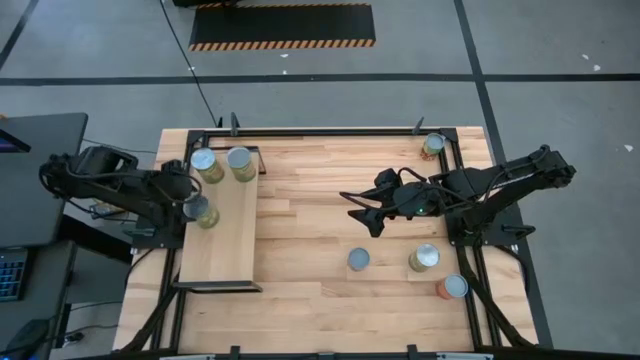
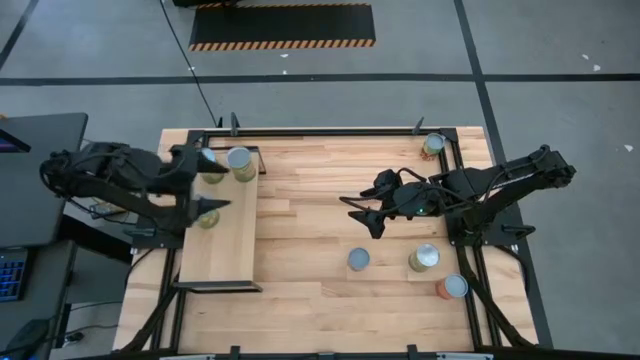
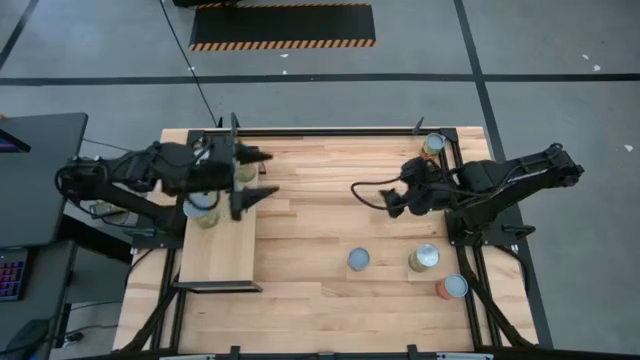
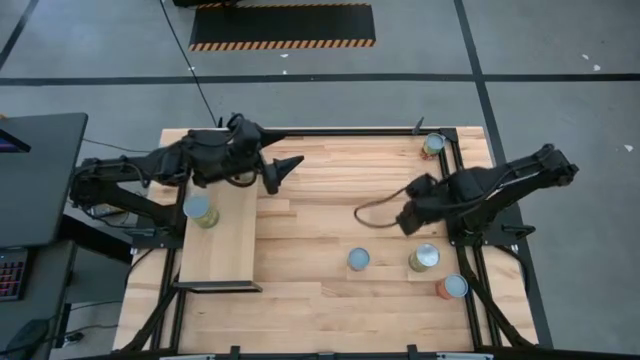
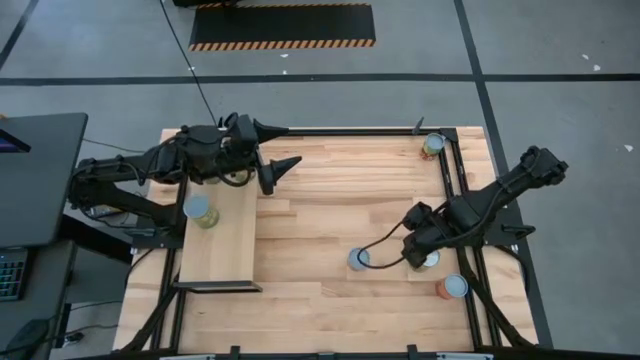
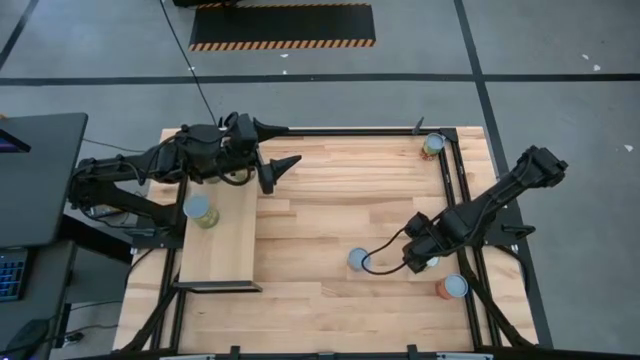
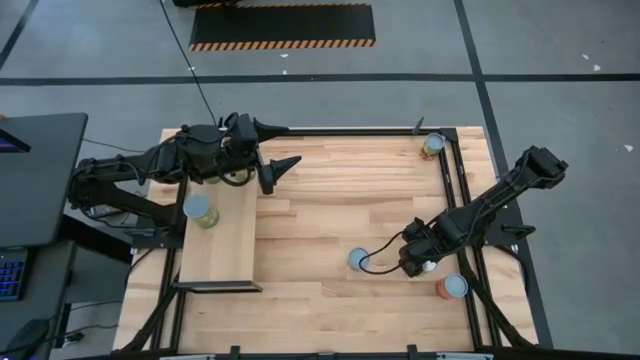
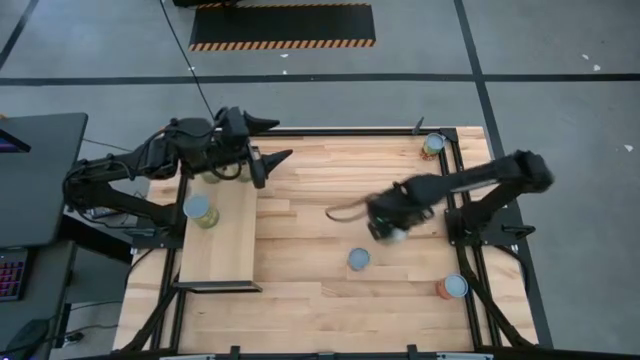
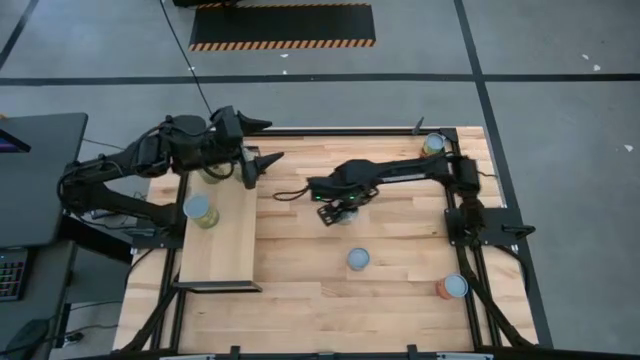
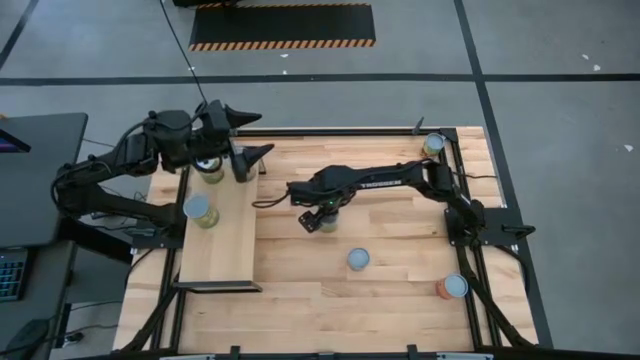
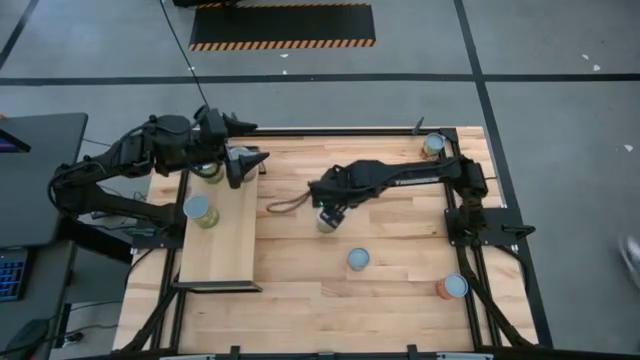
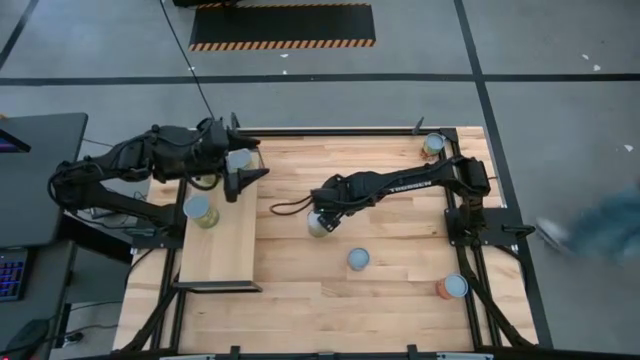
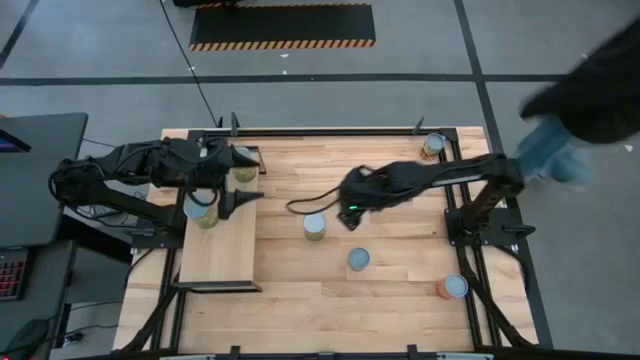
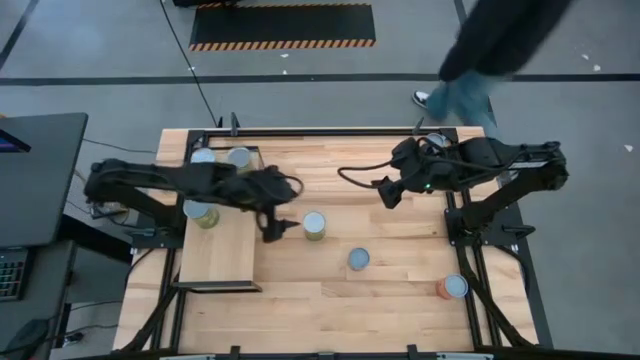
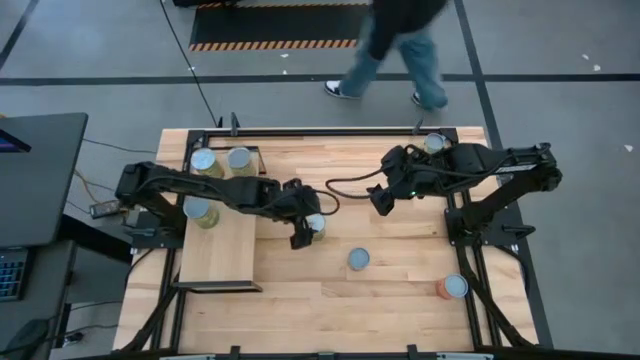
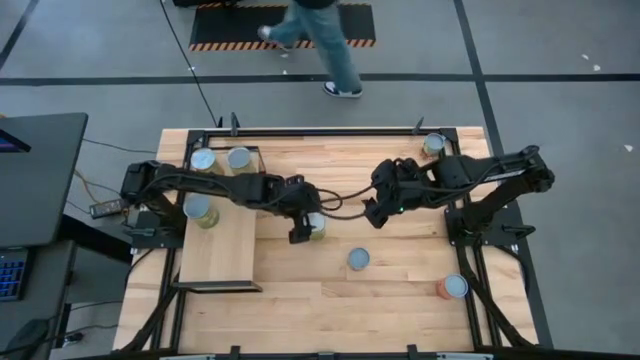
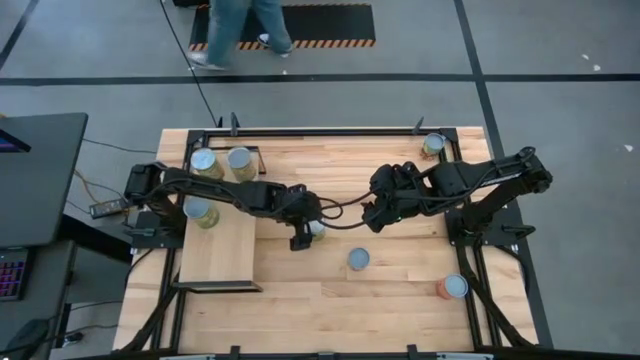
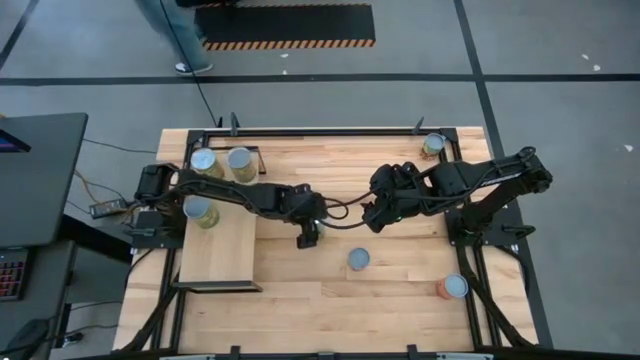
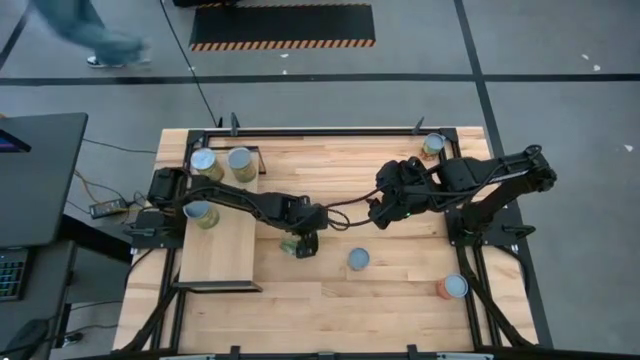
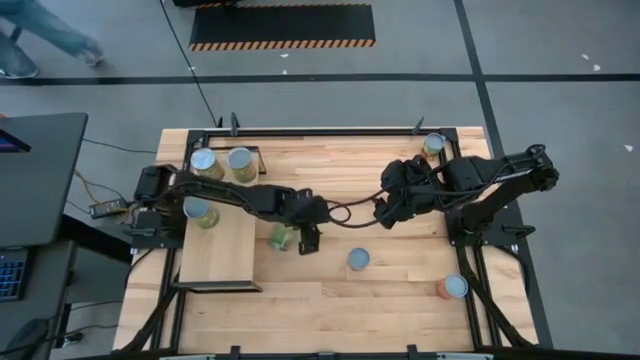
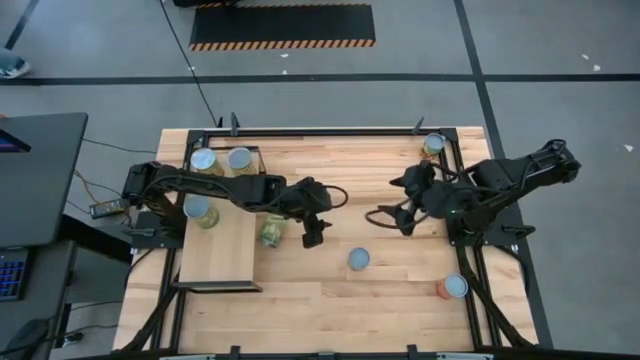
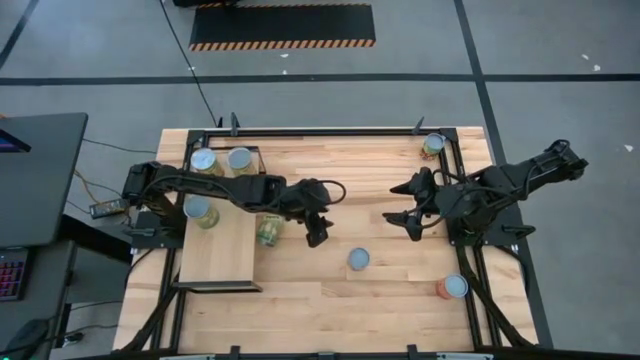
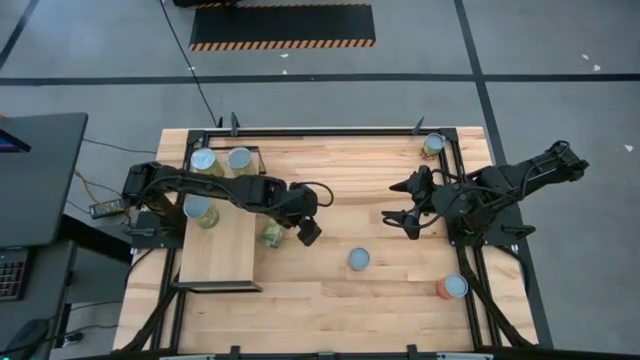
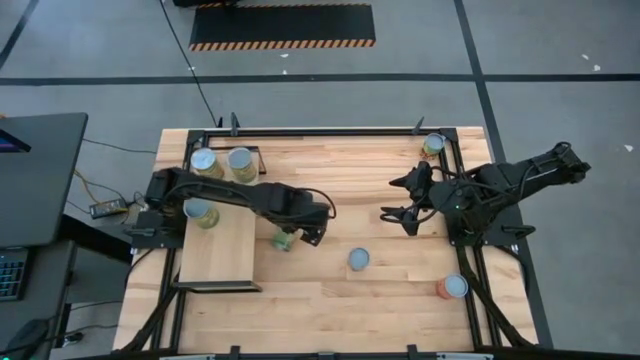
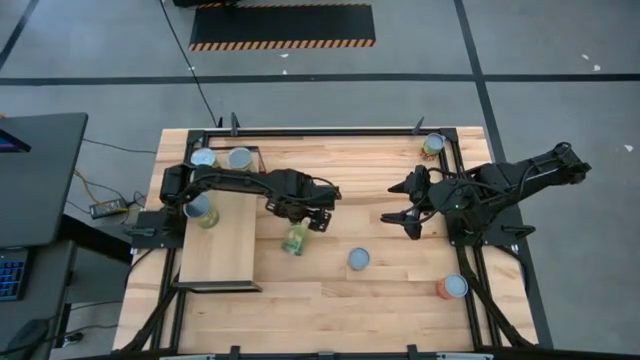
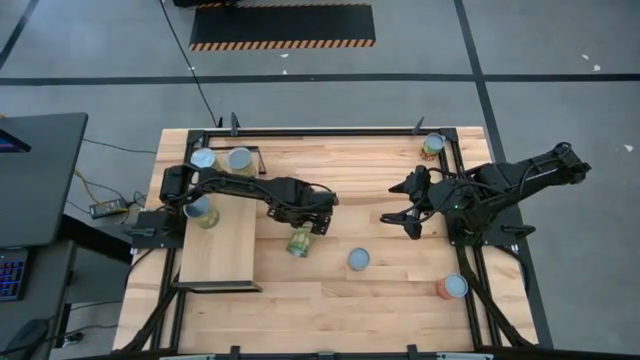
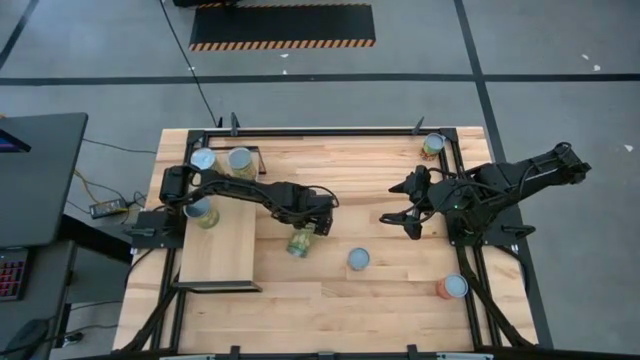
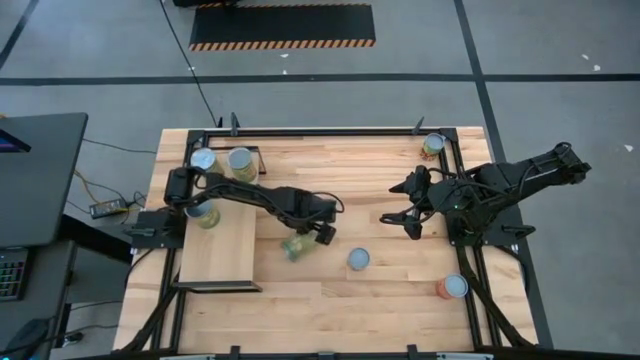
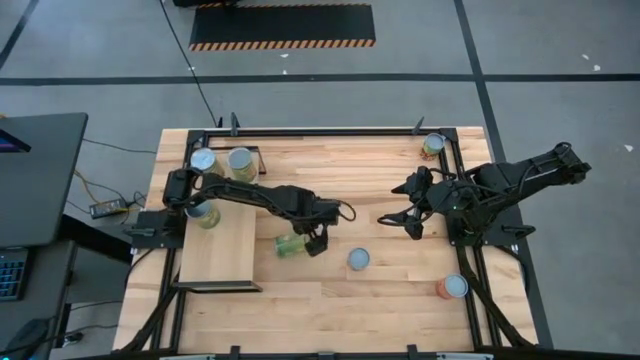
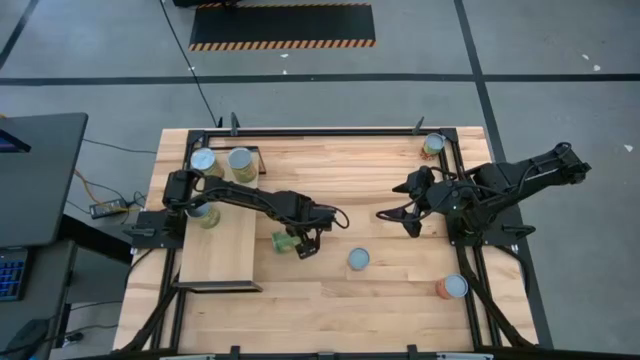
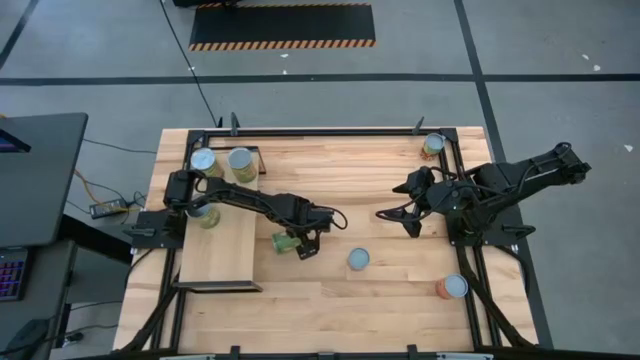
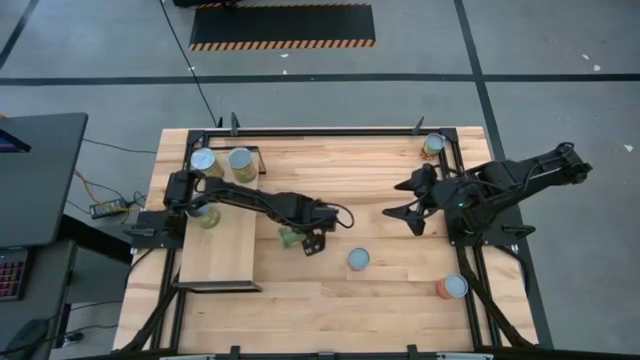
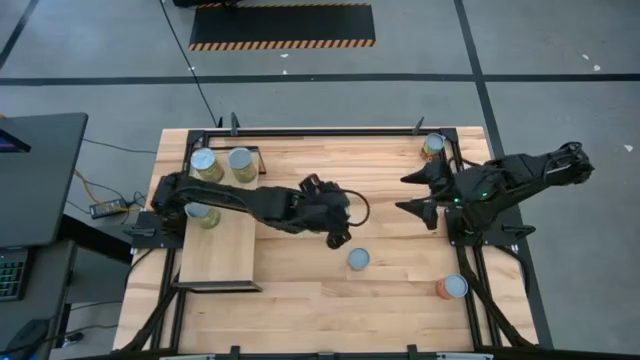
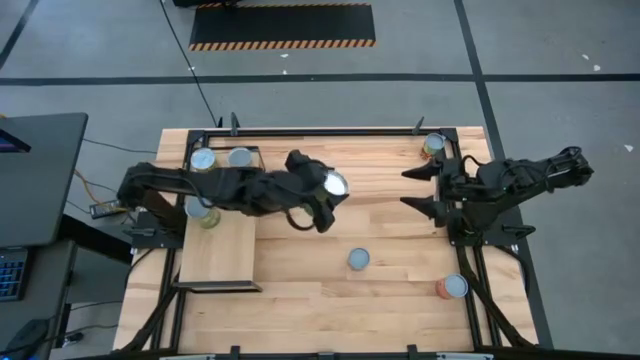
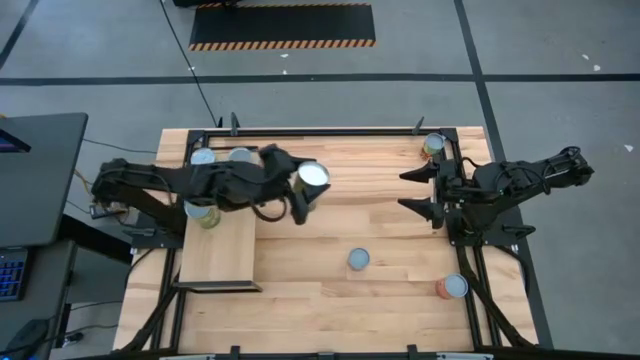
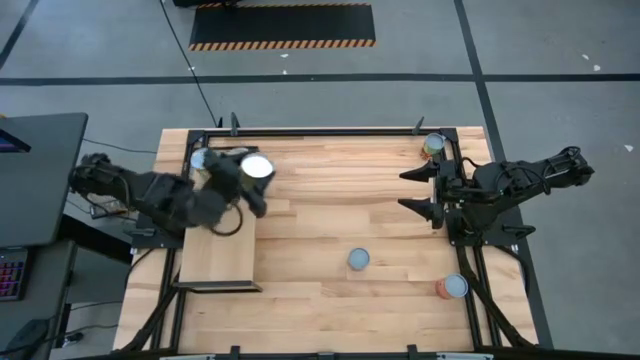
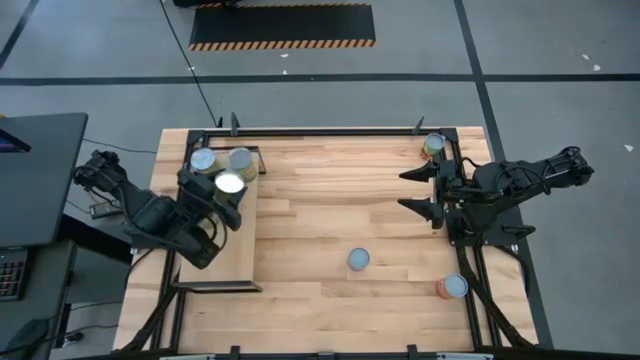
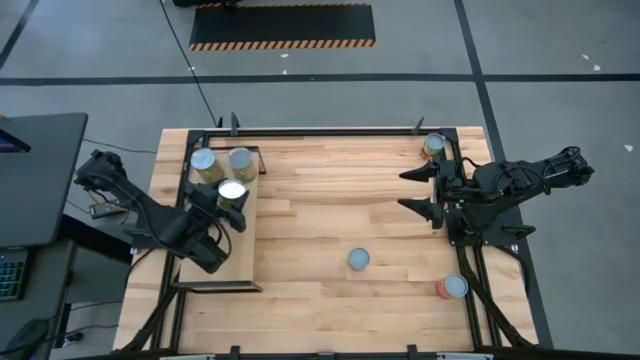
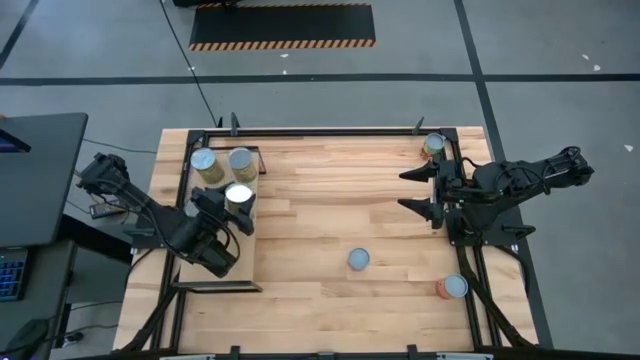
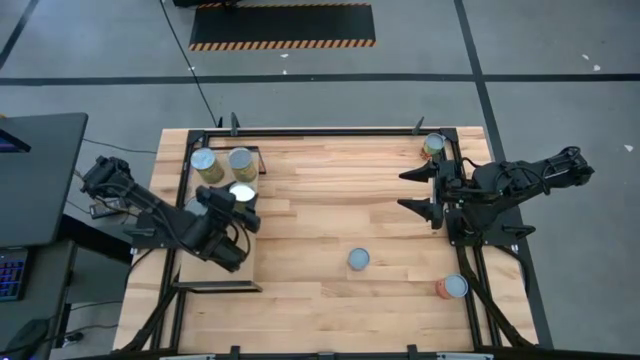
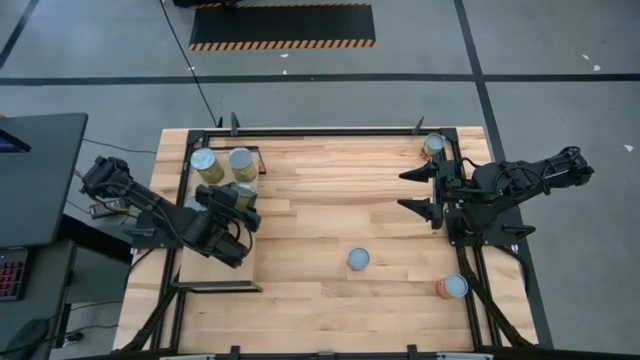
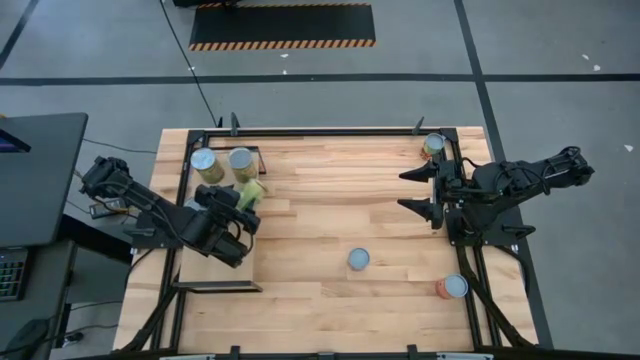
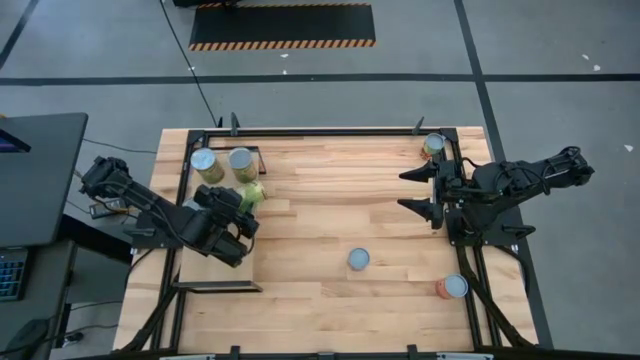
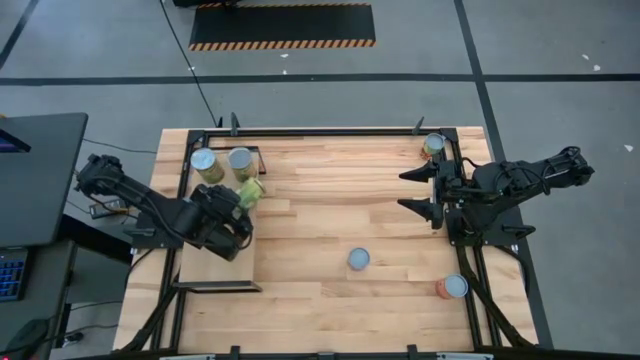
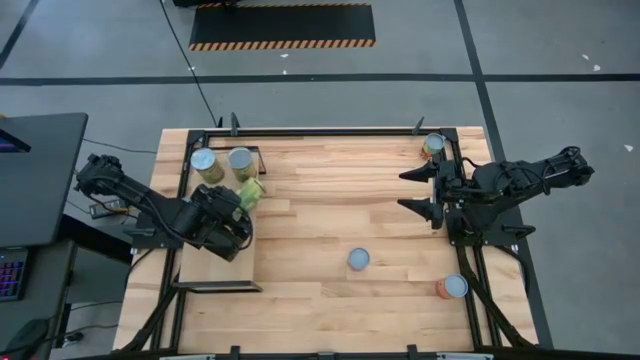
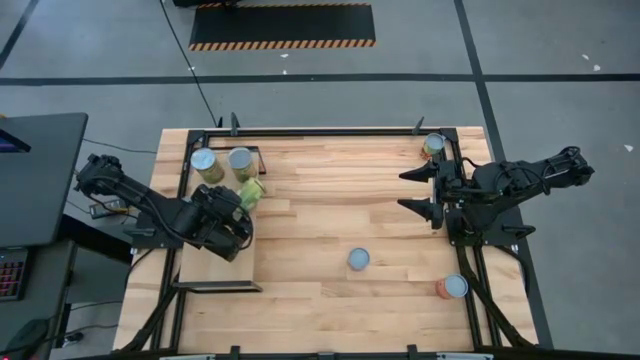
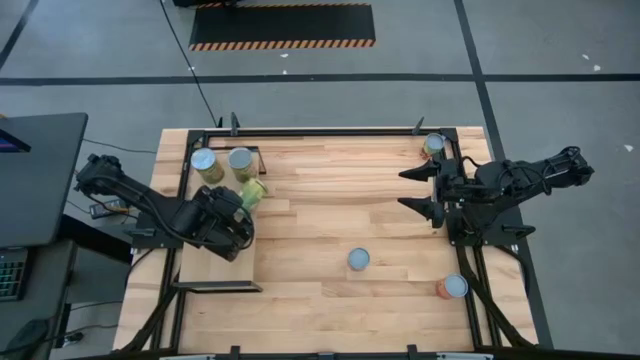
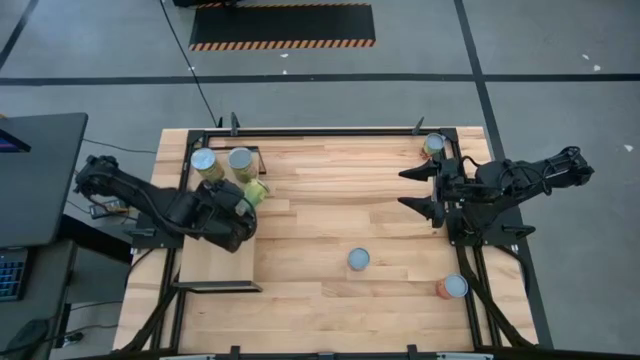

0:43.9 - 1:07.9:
Task: Pick and place cans onto a shelf
Put the canned pears on the shelf aligned with the other canned pears
